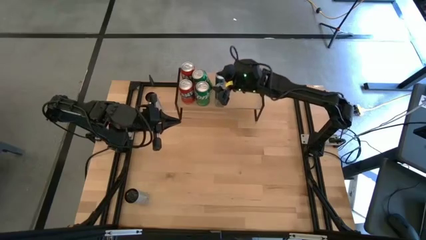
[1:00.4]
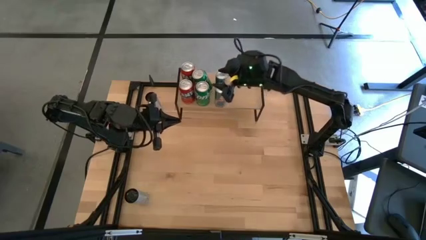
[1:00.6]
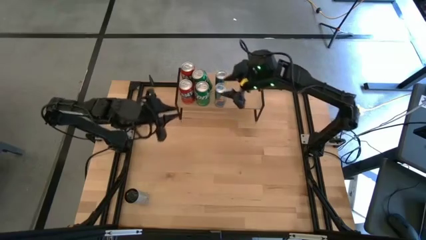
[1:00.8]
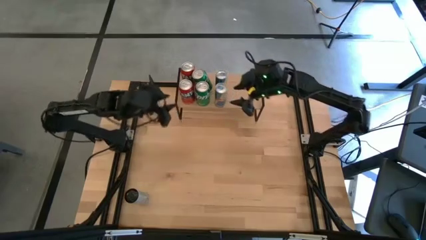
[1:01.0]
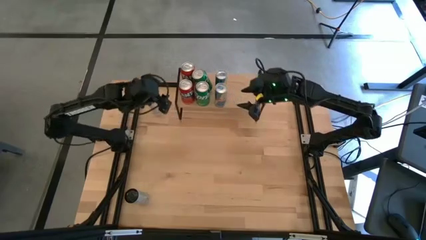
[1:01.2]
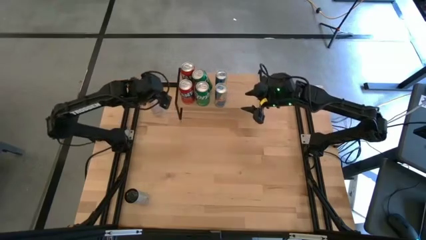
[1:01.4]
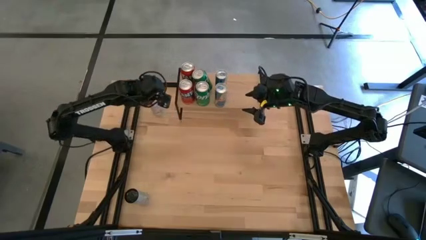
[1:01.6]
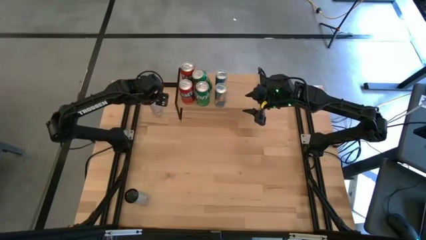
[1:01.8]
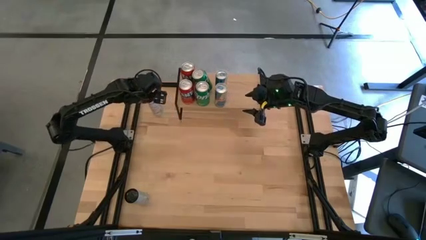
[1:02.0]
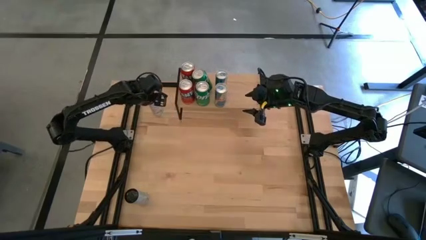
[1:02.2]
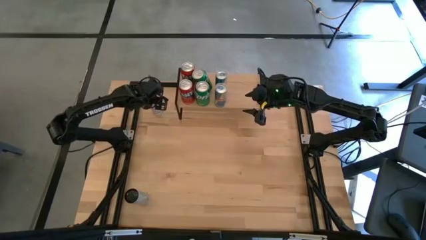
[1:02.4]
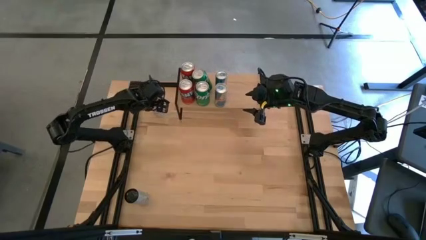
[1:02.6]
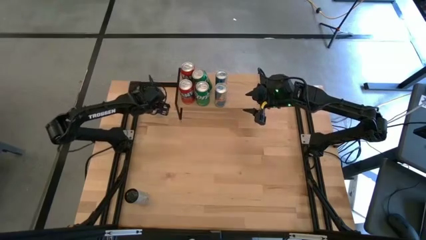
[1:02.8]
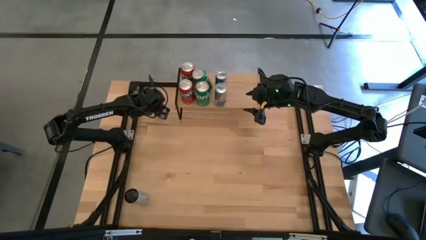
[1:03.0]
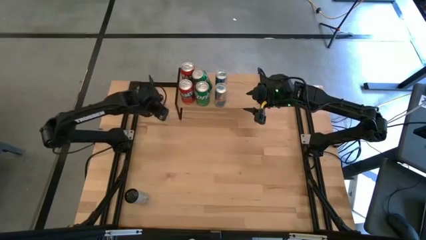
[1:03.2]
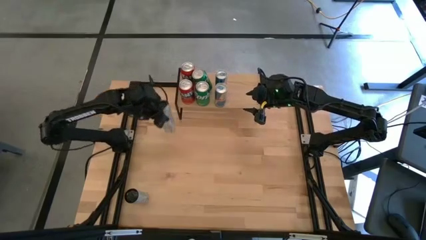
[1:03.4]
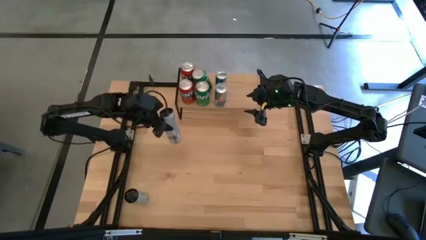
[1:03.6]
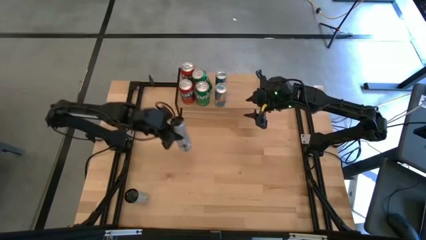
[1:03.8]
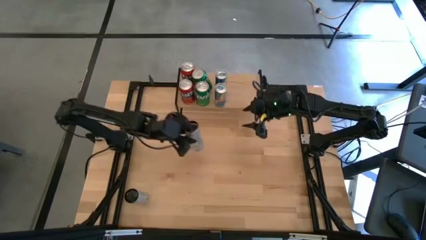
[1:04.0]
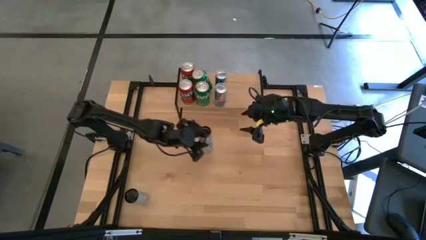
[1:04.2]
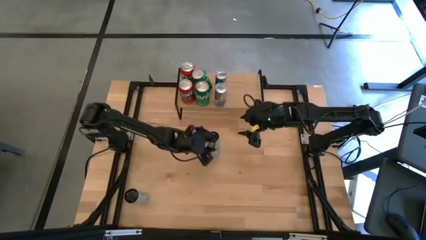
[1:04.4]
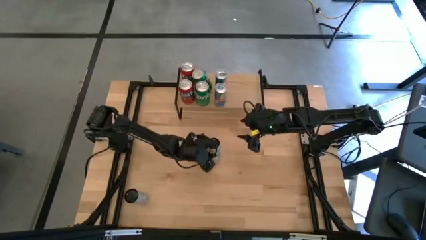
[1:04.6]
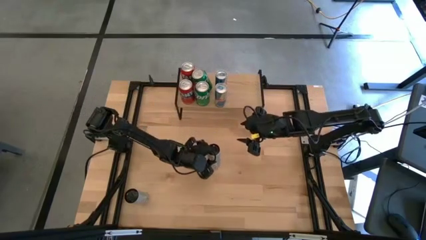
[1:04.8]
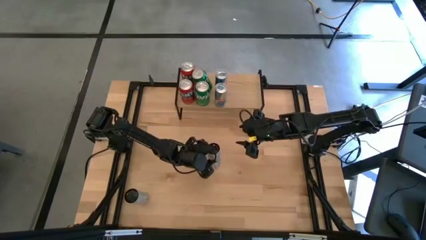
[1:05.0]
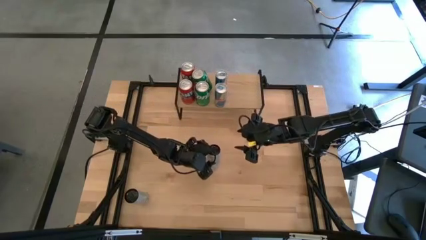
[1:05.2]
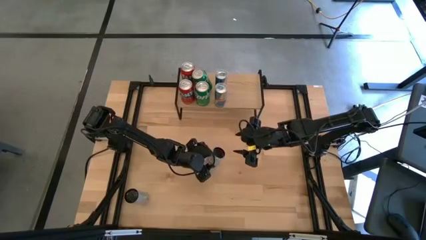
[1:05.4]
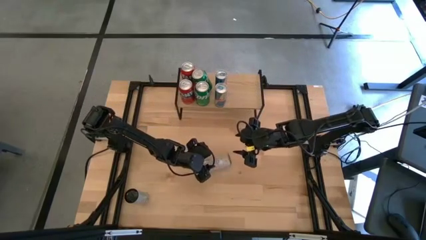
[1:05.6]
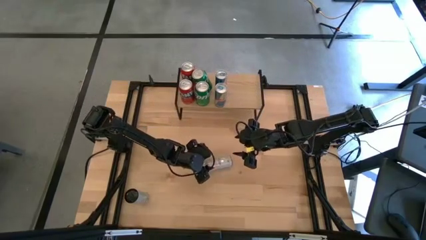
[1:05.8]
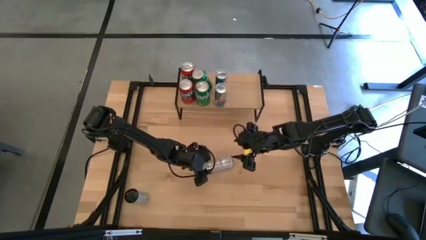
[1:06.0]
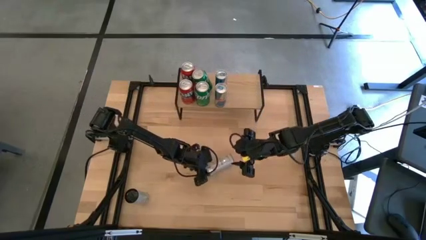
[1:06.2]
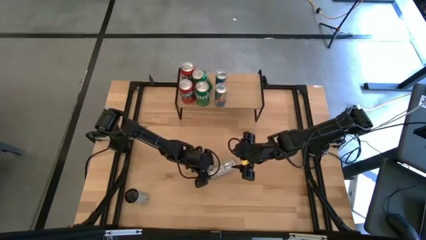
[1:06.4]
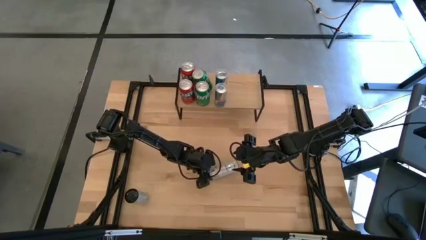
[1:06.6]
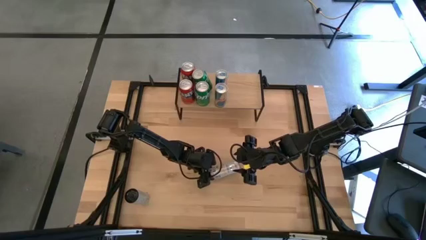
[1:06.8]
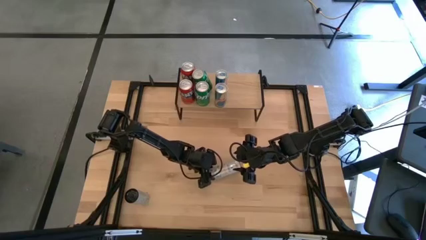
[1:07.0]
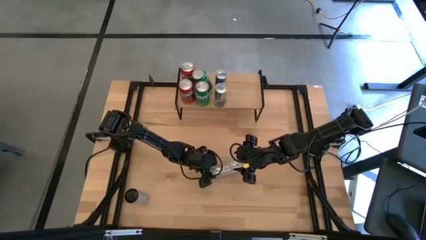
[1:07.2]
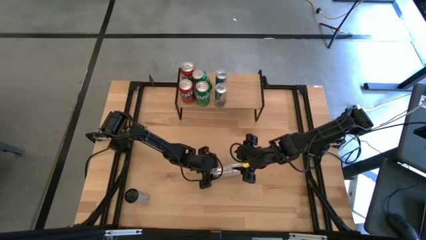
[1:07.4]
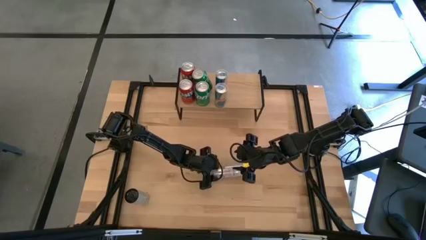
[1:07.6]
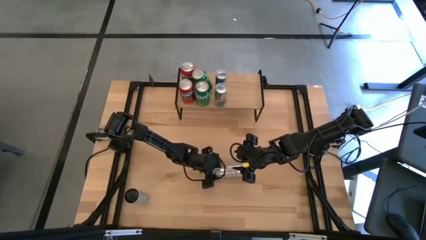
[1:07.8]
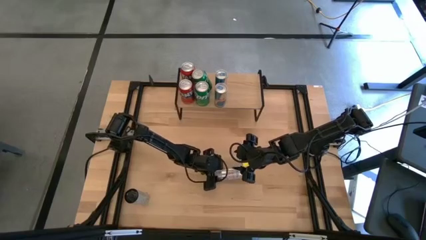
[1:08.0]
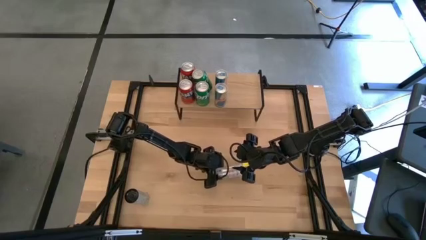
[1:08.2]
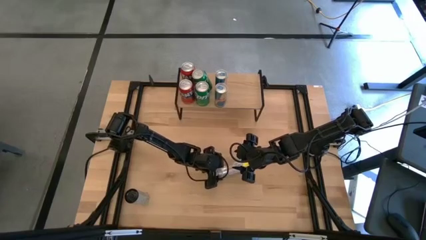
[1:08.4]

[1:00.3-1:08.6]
Task: Place canned beverage on shelf
Put the top white/yellow soda can on the shelf

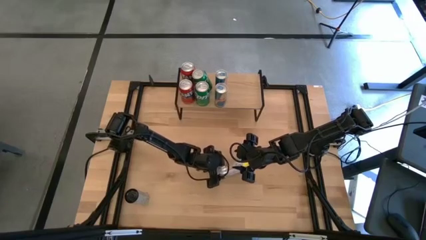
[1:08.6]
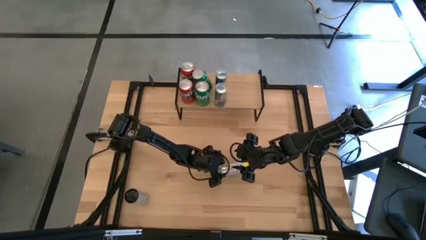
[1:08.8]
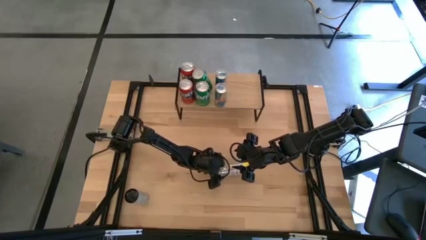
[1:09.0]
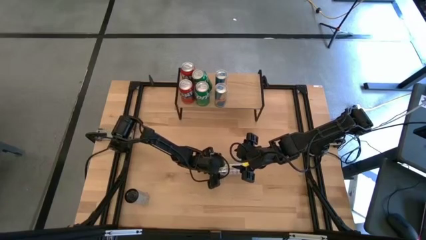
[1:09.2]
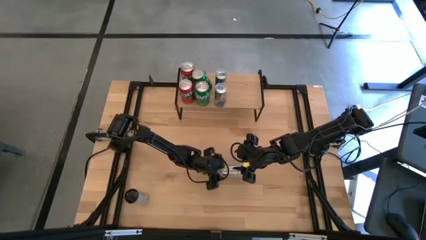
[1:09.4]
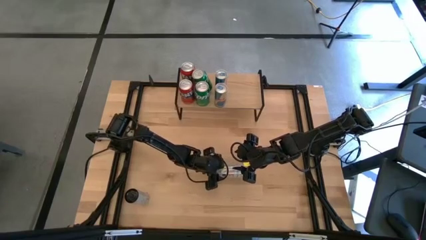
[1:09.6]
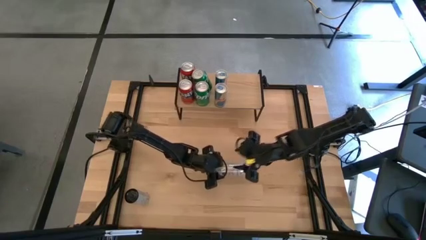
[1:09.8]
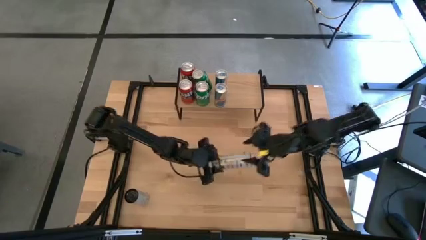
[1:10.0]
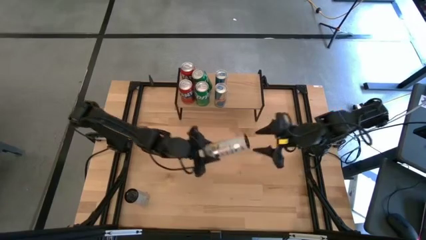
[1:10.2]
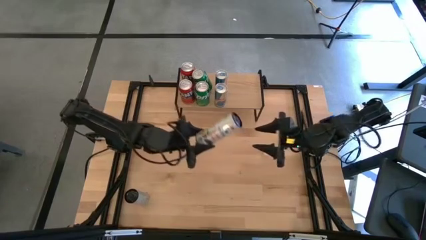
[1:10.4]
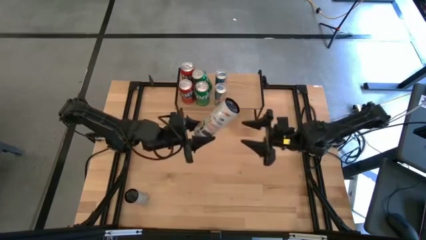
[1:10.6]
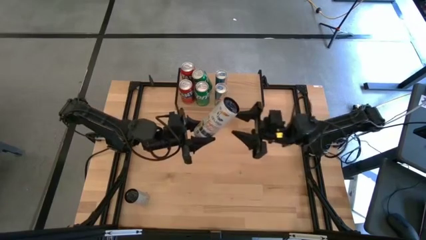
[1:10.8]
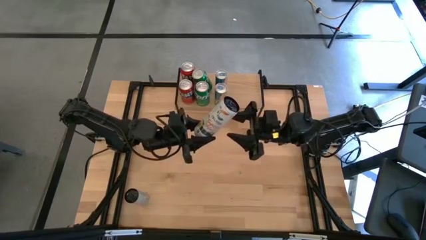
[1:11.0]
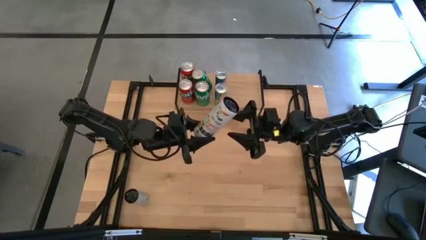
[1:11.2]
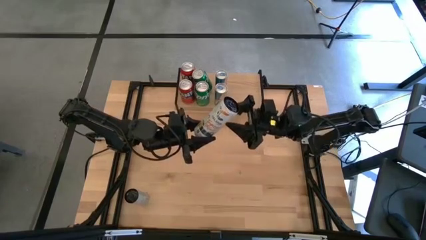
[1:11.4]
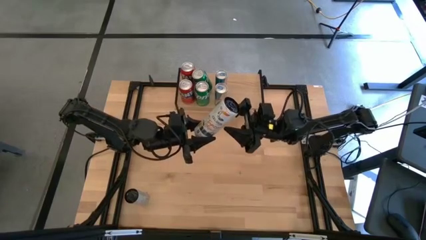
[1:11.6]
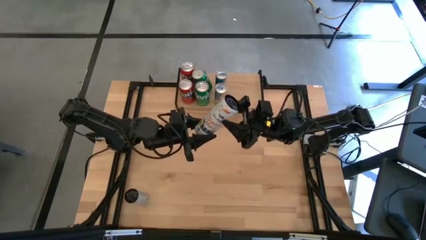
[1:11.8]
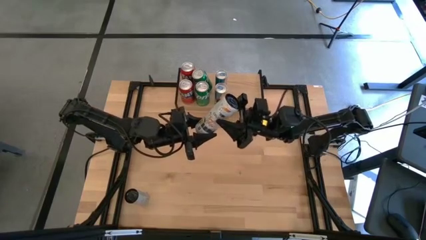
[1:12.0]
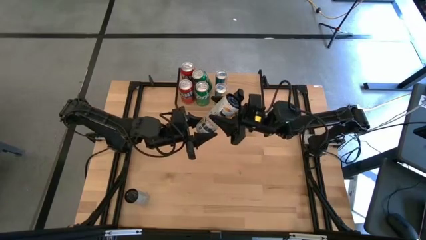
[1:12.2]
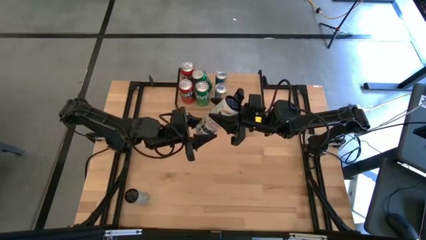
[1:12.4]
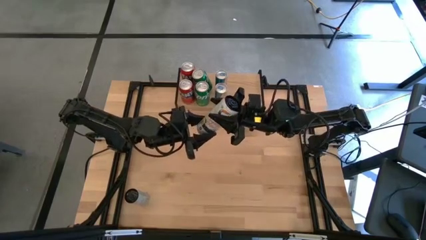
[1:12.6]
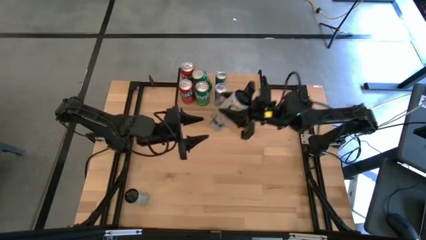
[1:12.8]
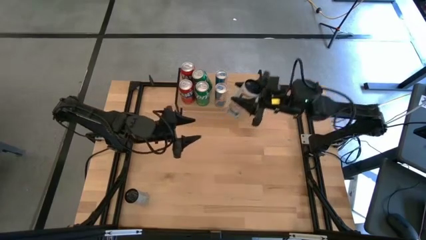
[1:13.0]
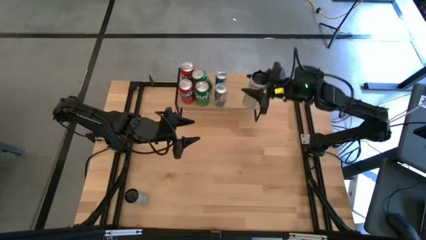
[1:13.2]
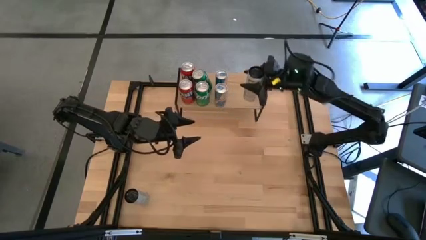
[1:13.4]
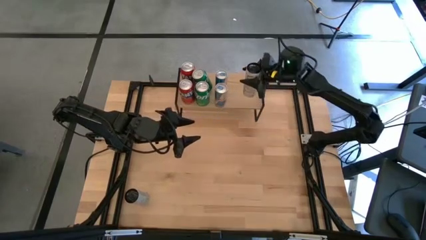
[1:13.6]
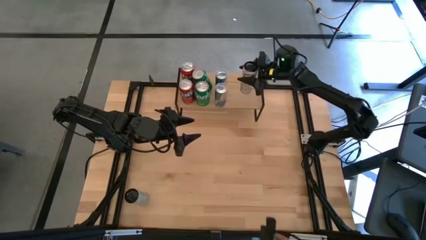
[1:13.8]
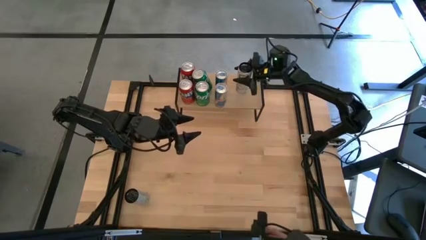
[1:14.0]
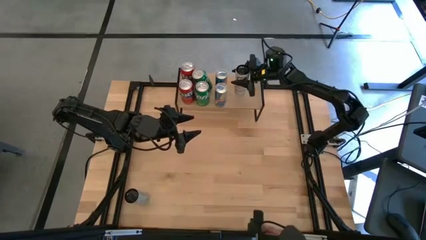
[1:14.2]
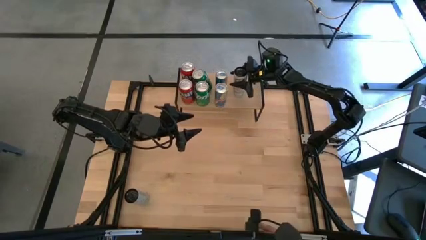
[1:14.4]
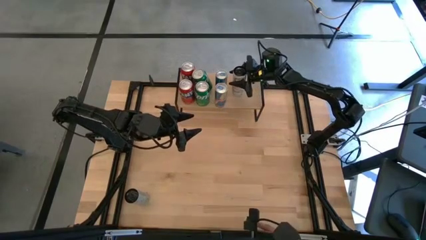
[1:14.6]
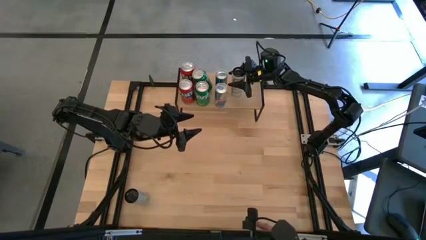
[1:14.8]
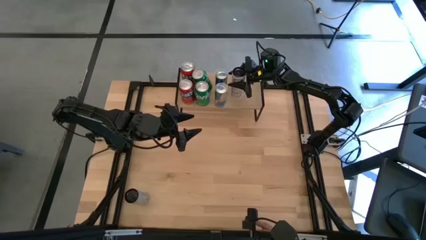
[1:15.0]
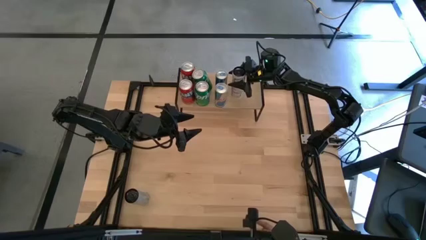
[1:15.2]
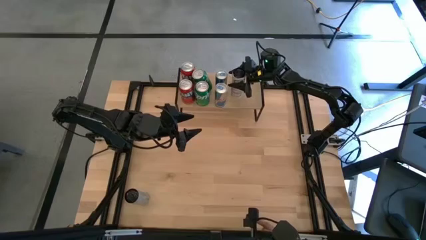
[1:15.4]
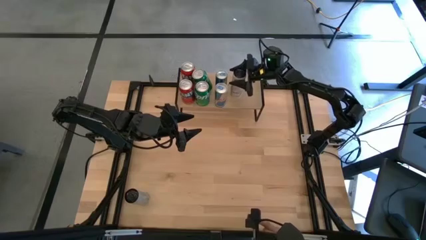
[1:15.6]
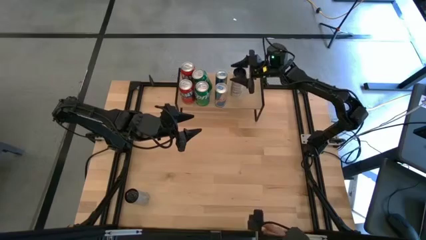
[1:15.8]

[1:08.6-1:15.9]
Put the top white-yellow soda can on the shelf

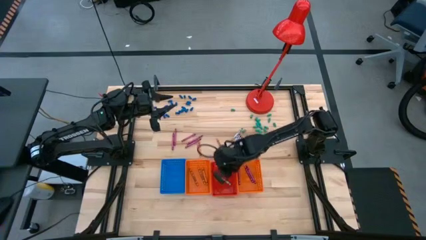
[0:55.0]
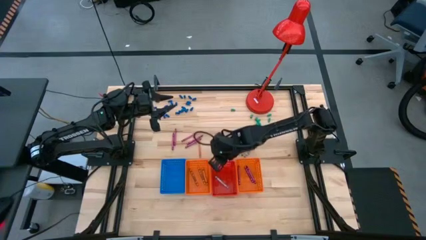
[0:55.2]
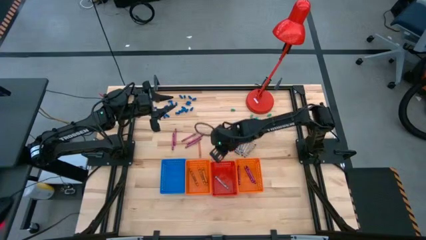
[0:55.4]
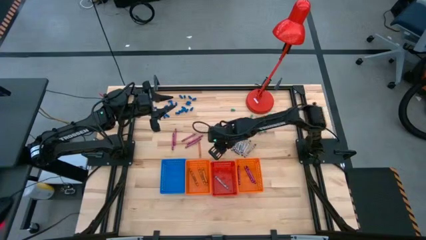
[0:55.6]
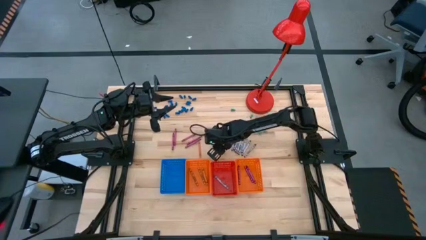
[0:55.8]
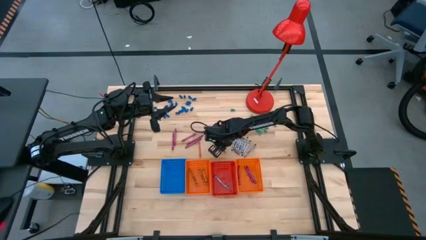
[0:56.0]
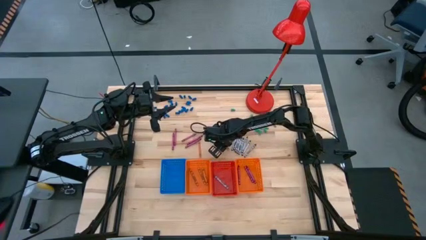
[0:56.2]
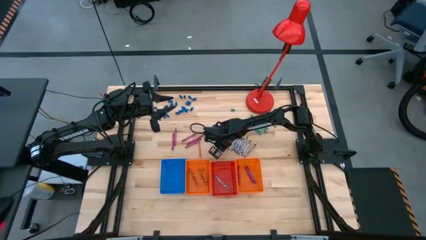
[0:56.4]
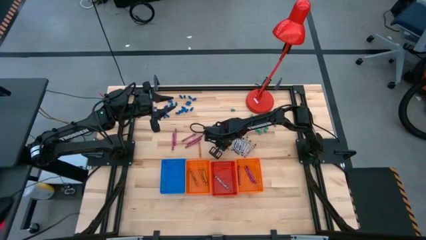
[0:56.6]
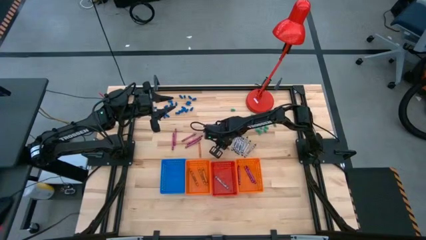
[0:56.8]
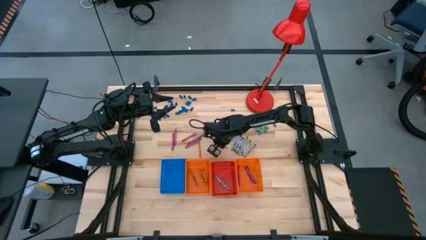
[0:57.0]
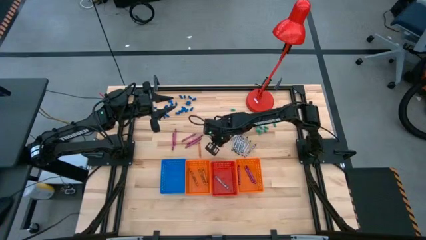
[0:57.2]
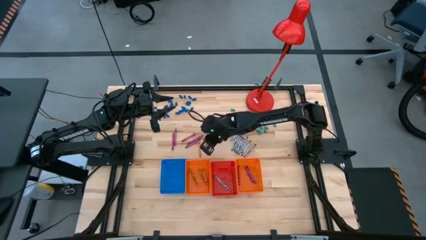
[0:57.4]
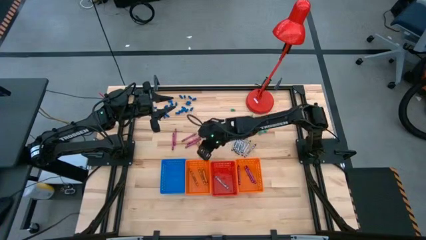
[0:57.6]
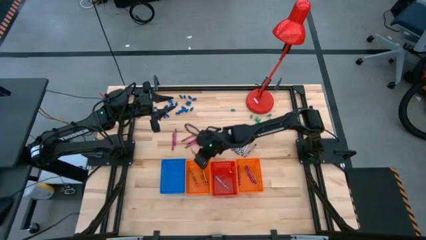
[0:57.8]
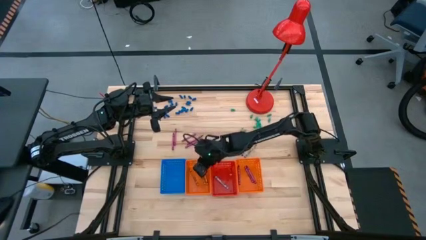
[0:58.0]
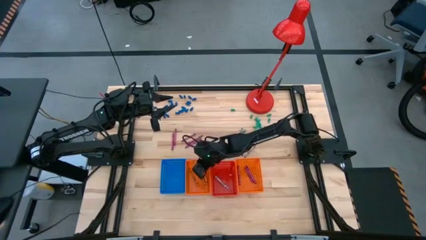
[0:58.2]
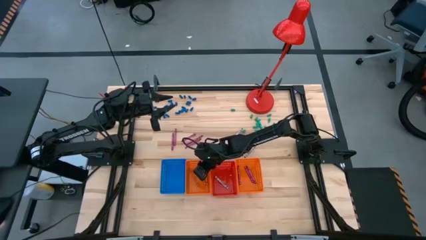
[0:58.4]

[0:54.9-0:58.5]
Task: Sort crayons
Put the orange crayon into the left orange bin
